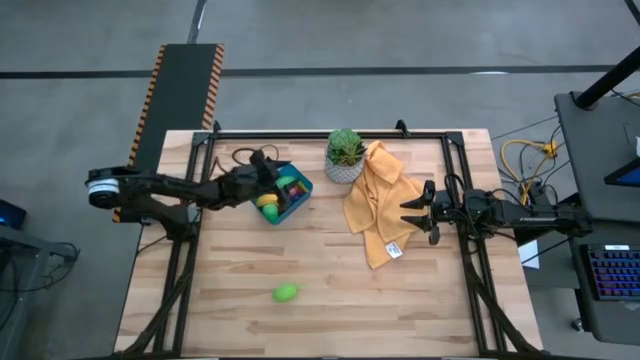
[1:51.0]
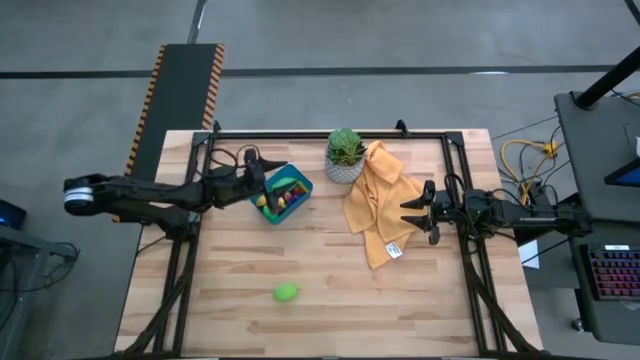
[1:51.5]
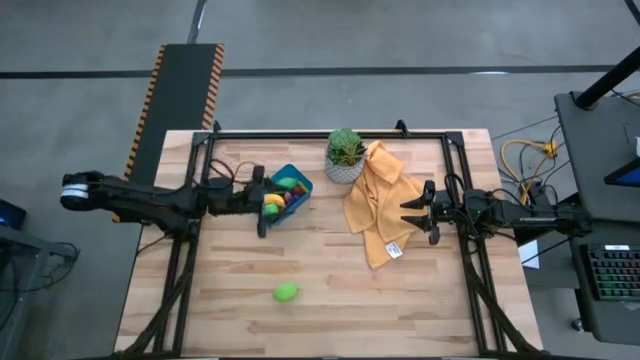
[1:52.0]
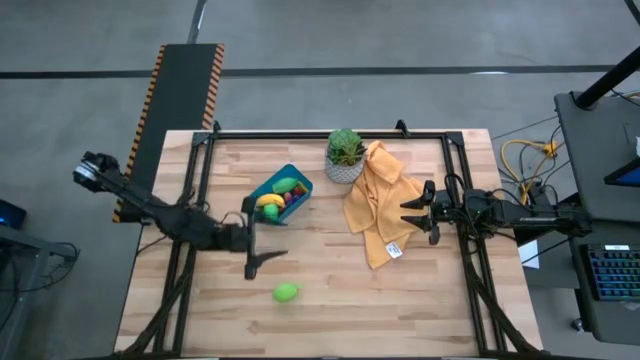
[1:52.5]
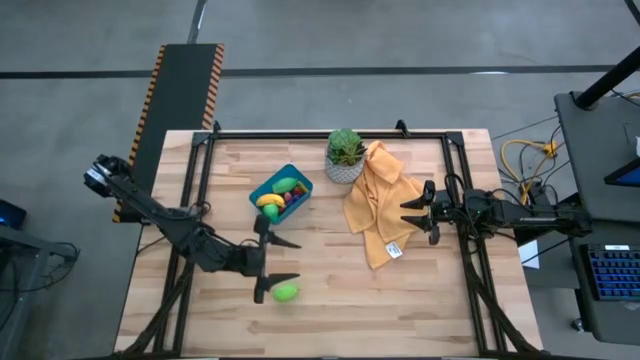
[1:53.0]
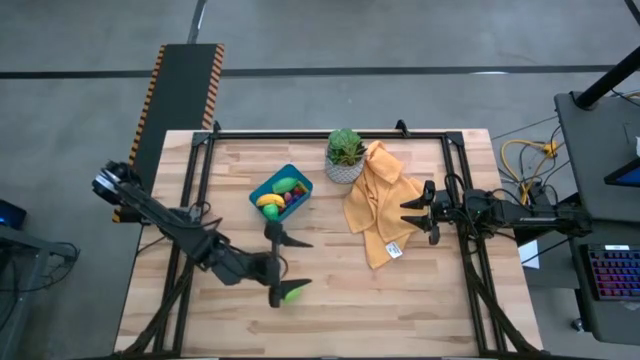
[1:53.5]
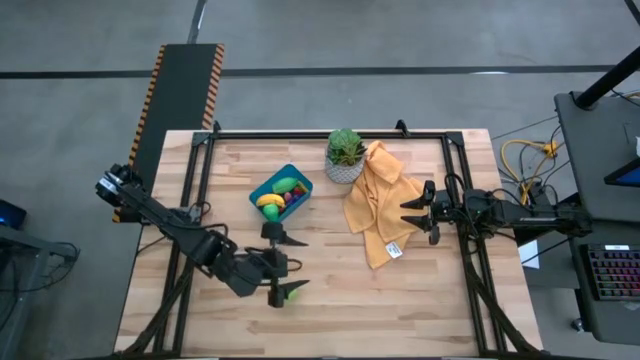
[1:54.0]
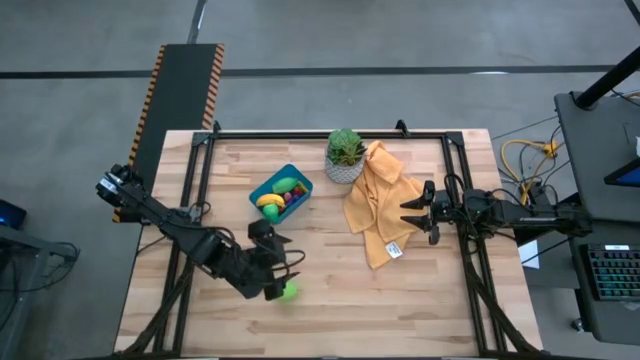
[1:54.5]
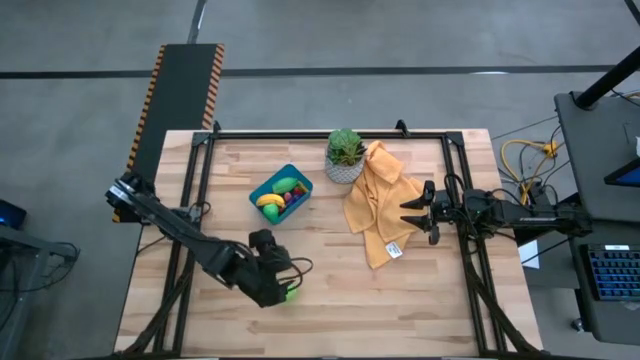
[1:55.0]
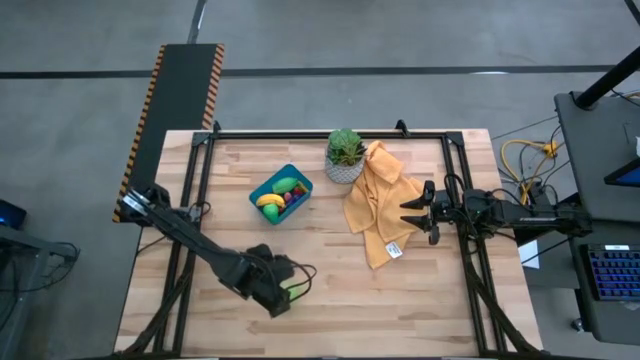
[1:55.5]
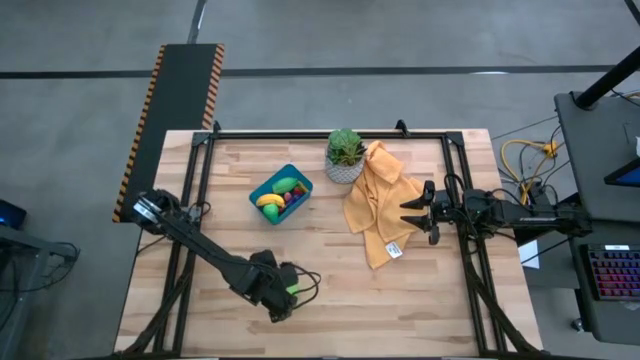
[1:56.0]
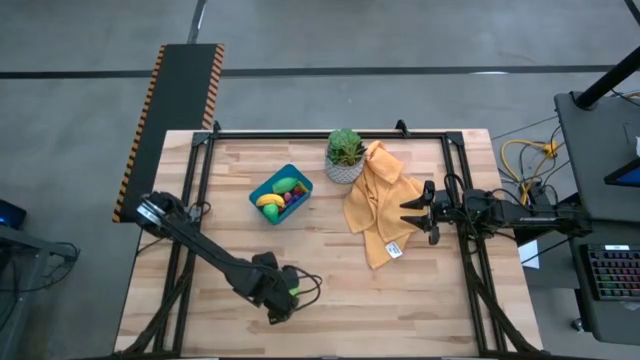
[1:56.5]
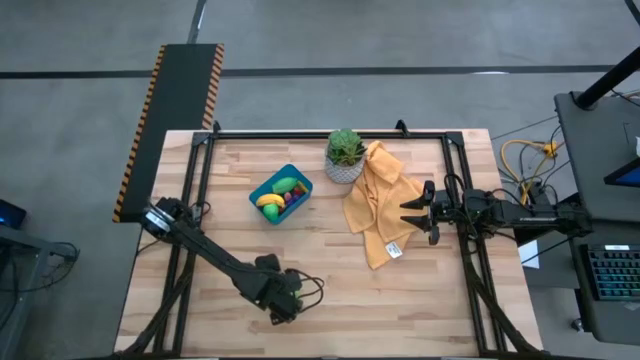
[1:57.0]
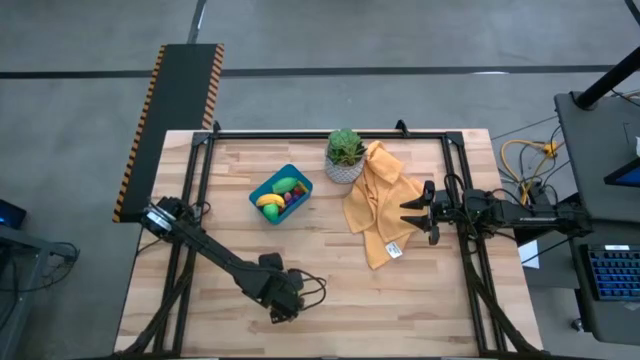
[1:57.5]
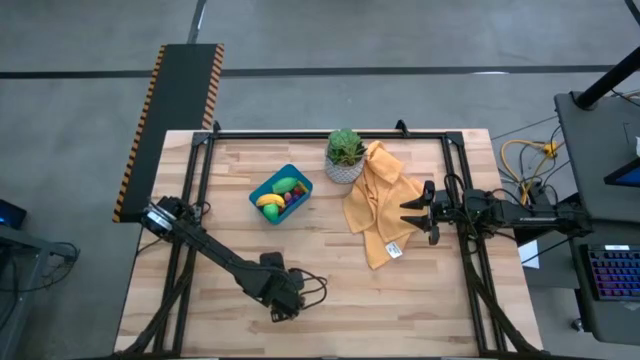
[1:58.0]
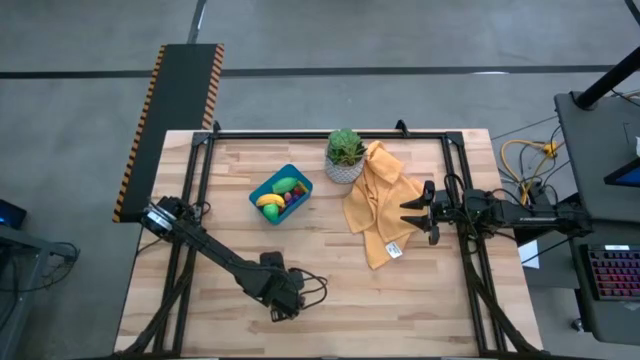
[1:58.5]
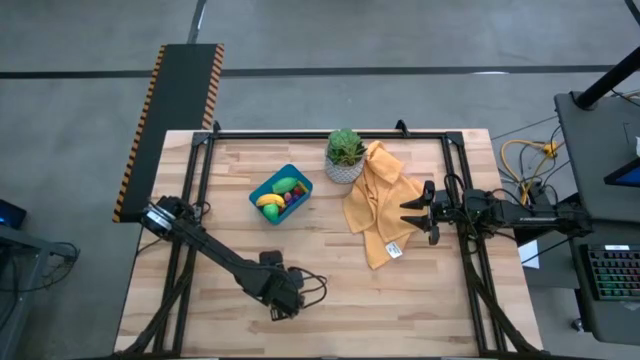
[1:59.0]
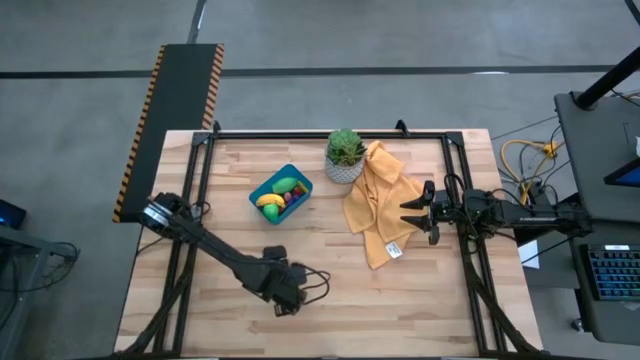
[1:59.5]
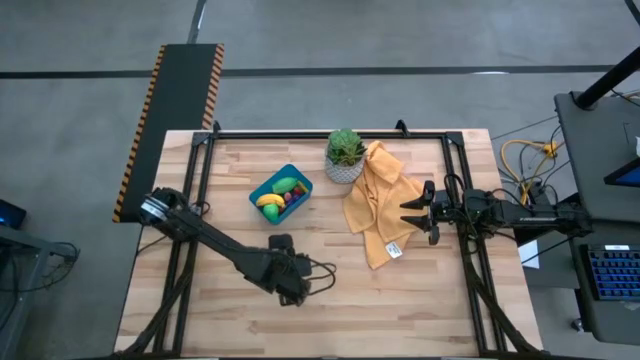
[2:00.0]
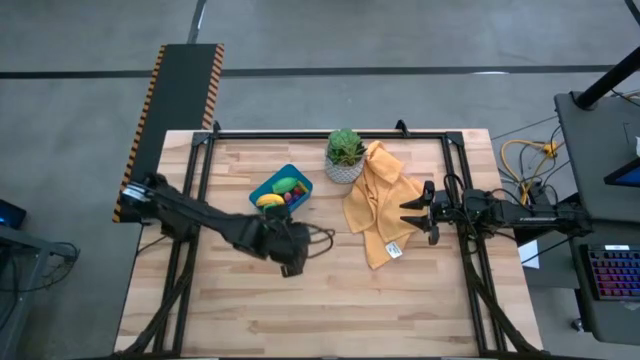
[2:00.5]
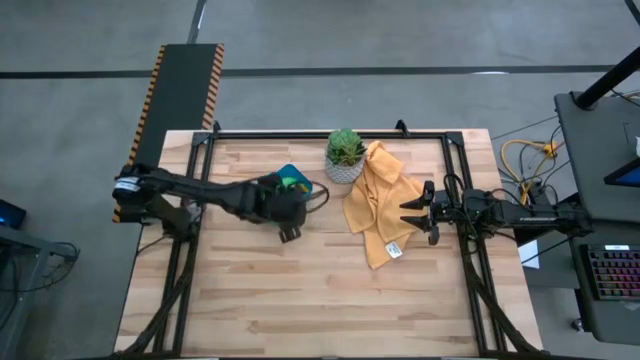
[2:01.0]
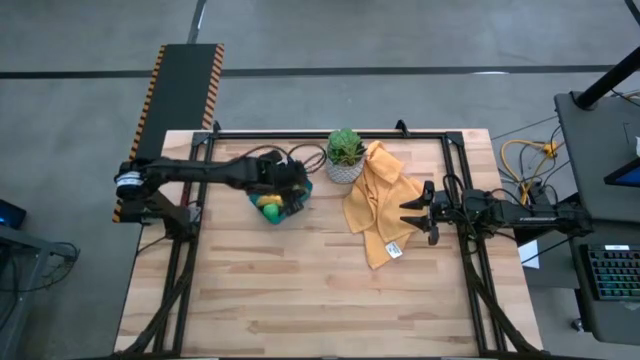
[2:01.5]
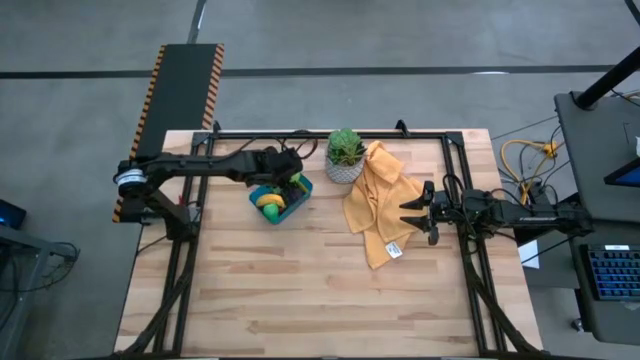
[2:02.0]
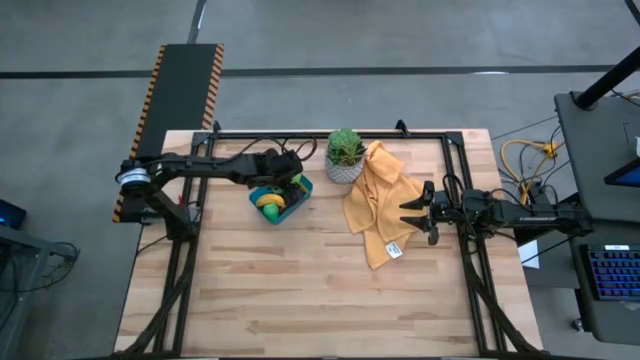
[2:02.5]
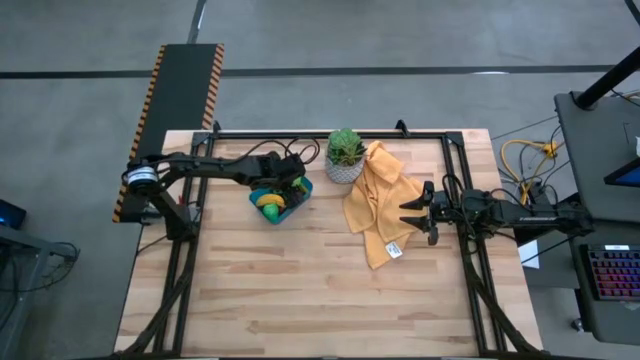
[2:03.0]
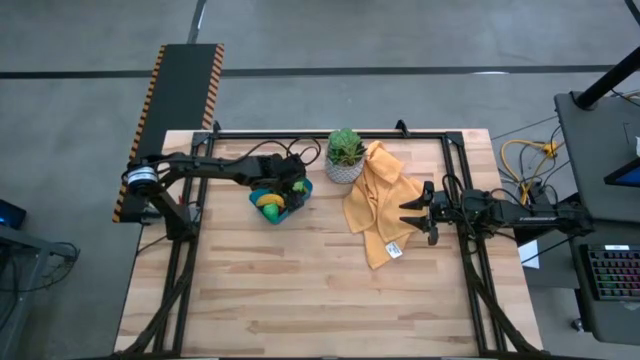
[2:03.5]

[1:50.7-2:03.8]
Task: Pick and placing Produce into tupperware
Put the green melon into the blue bin
